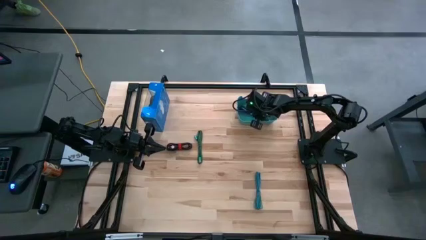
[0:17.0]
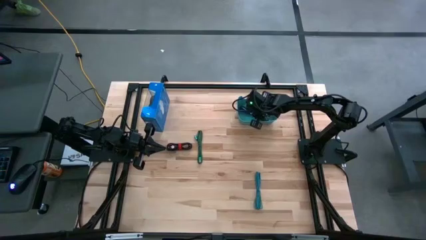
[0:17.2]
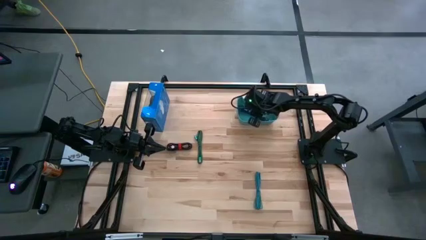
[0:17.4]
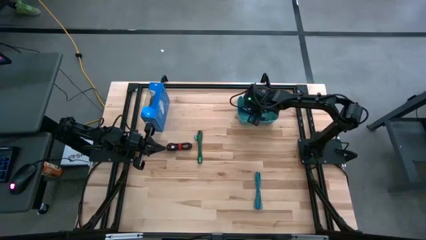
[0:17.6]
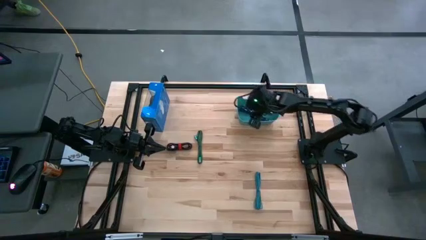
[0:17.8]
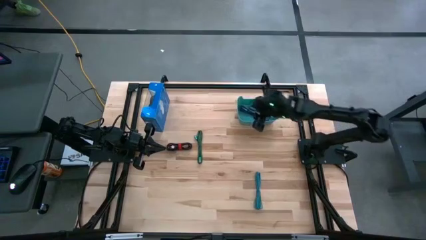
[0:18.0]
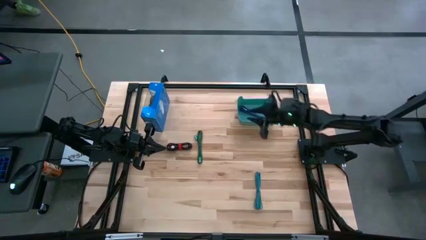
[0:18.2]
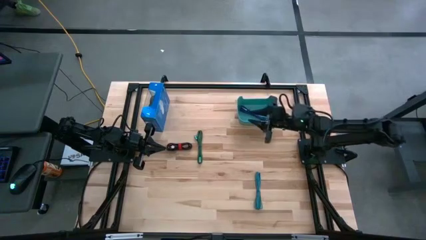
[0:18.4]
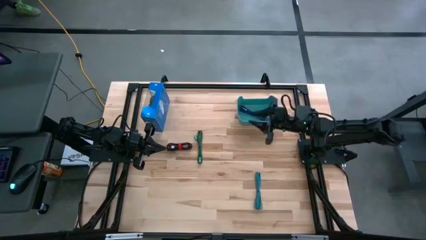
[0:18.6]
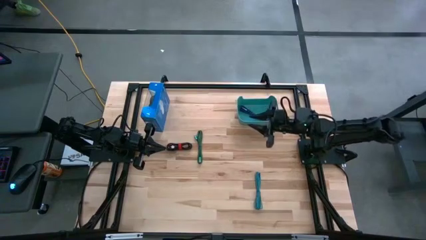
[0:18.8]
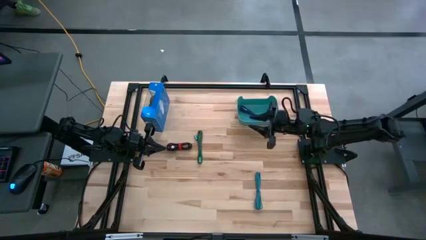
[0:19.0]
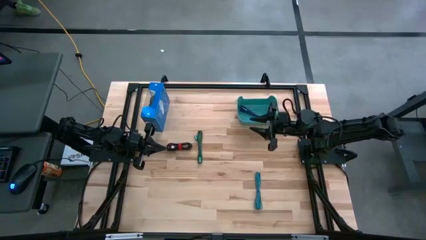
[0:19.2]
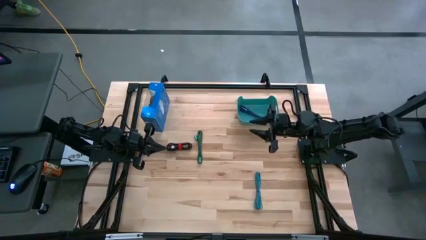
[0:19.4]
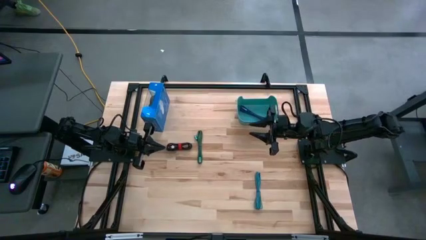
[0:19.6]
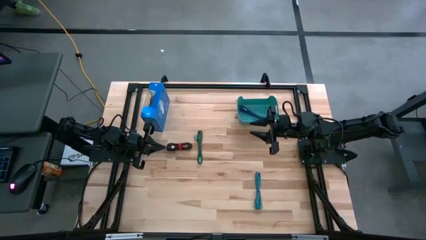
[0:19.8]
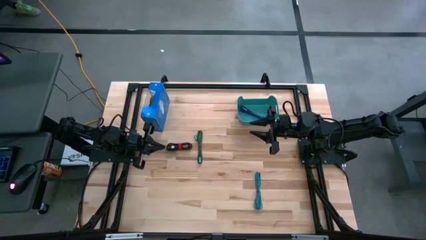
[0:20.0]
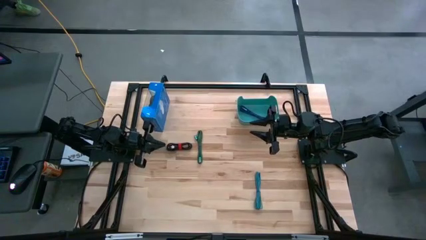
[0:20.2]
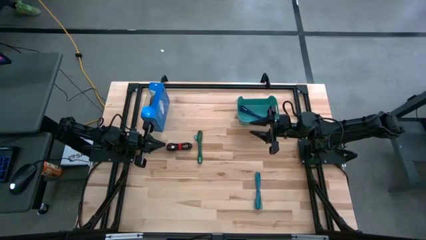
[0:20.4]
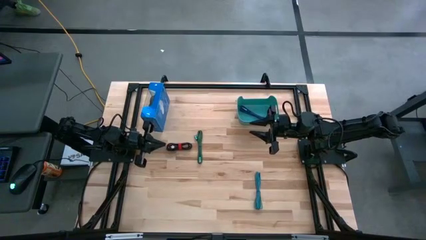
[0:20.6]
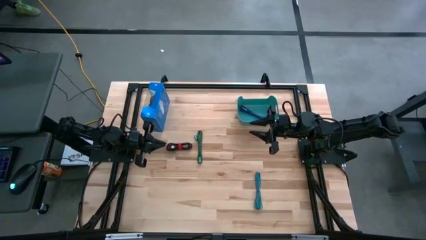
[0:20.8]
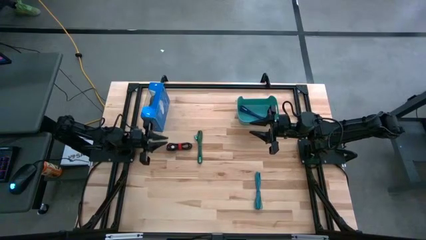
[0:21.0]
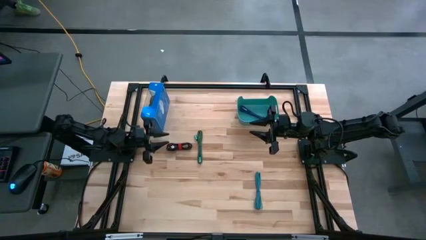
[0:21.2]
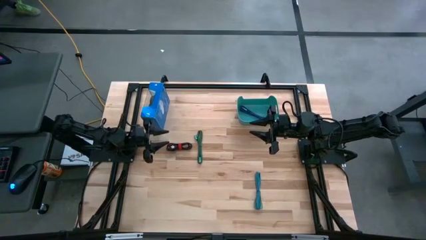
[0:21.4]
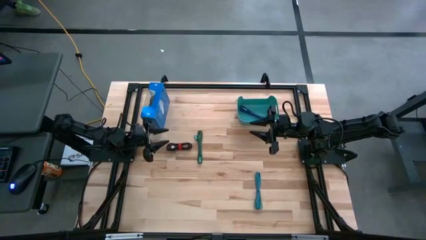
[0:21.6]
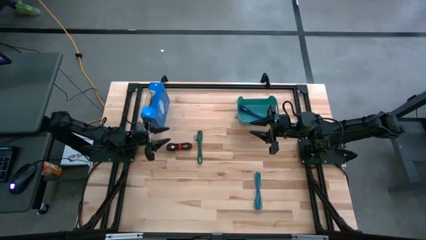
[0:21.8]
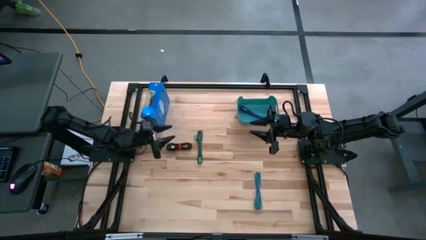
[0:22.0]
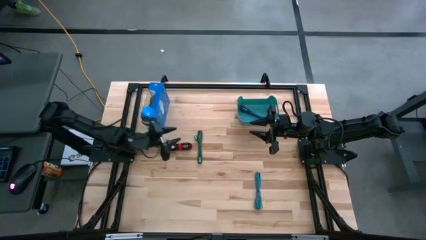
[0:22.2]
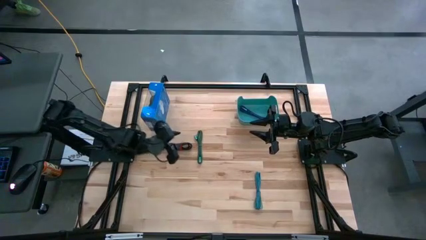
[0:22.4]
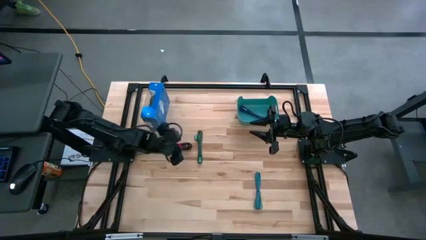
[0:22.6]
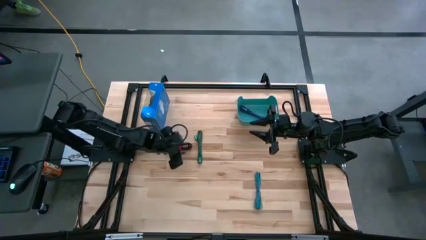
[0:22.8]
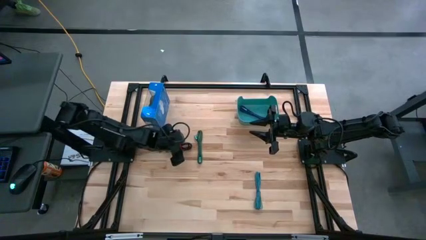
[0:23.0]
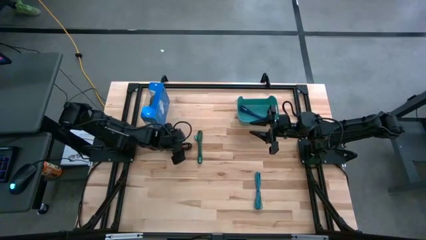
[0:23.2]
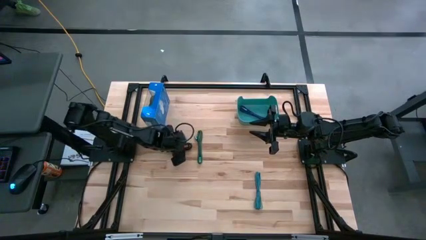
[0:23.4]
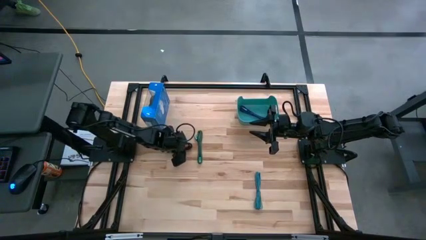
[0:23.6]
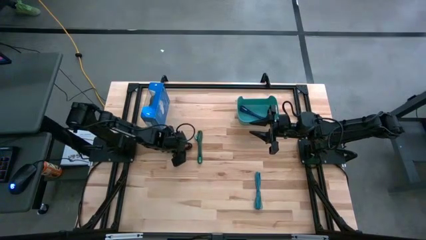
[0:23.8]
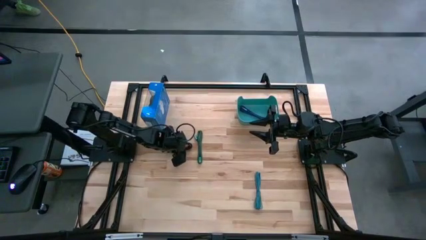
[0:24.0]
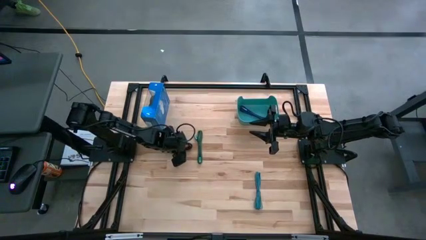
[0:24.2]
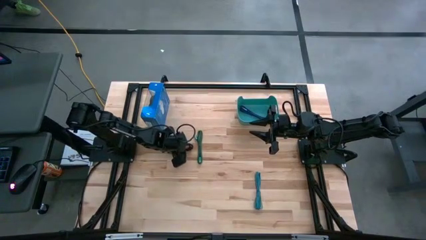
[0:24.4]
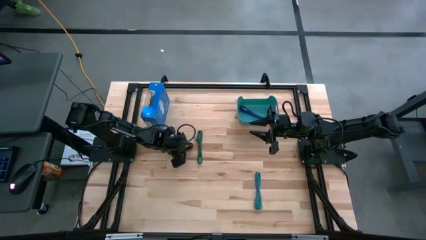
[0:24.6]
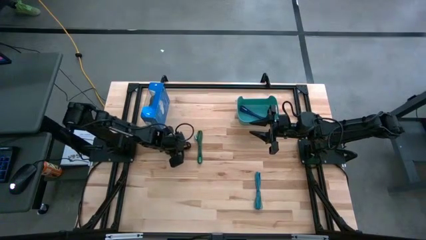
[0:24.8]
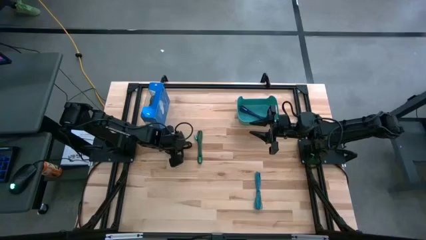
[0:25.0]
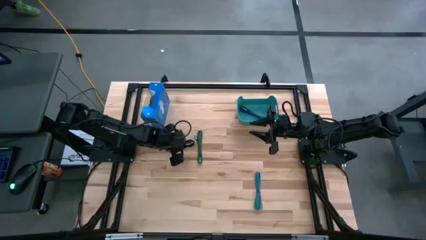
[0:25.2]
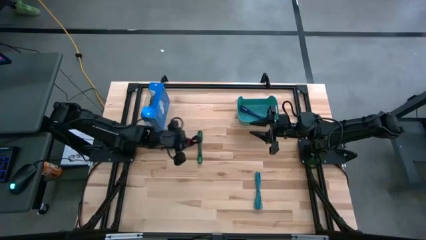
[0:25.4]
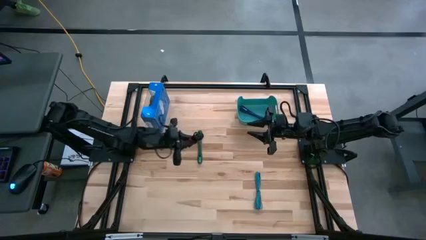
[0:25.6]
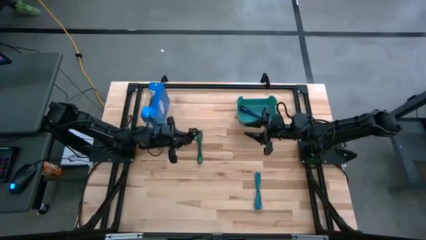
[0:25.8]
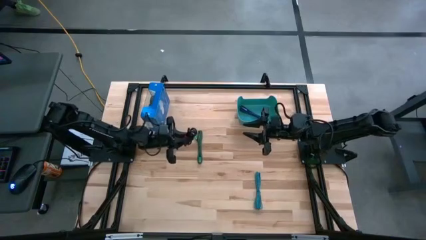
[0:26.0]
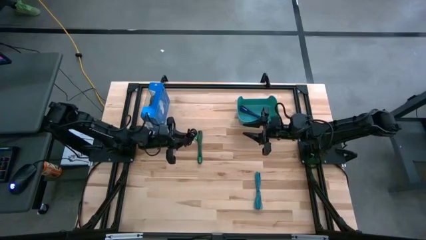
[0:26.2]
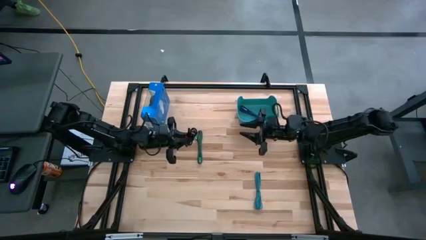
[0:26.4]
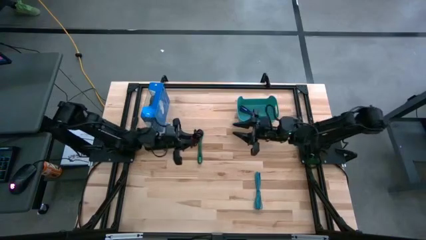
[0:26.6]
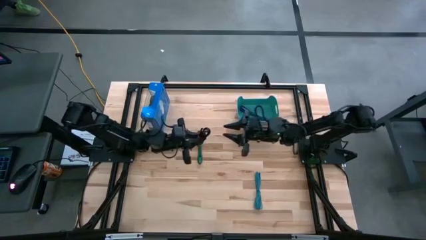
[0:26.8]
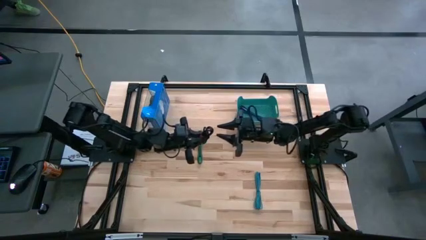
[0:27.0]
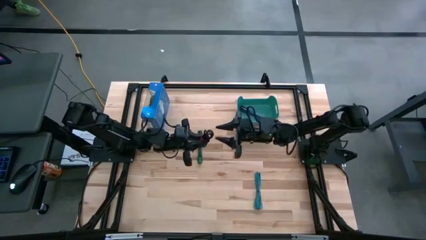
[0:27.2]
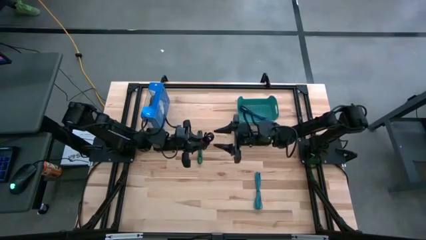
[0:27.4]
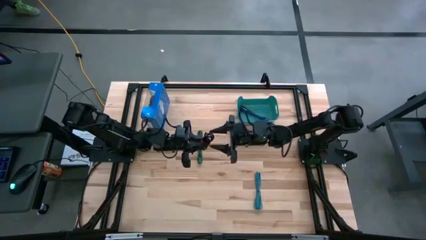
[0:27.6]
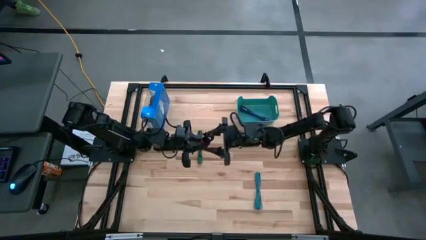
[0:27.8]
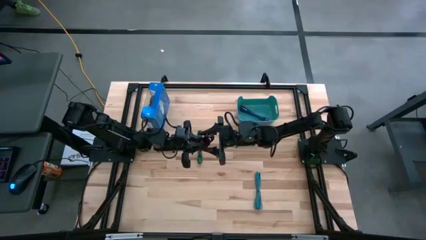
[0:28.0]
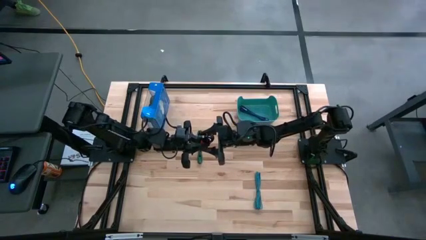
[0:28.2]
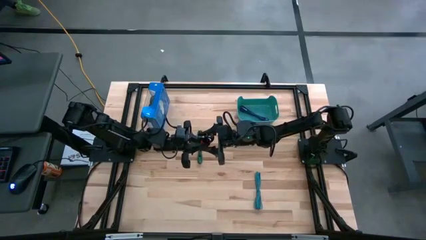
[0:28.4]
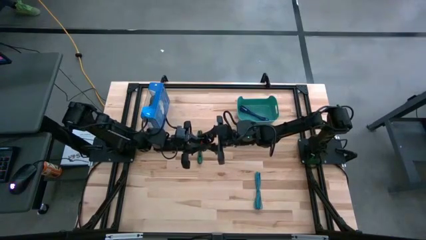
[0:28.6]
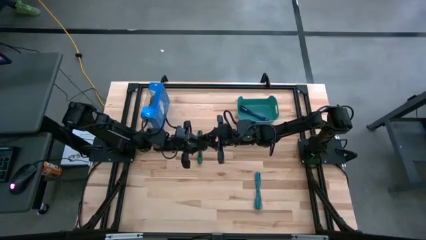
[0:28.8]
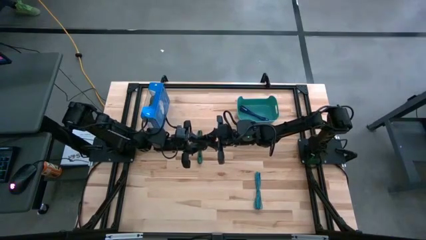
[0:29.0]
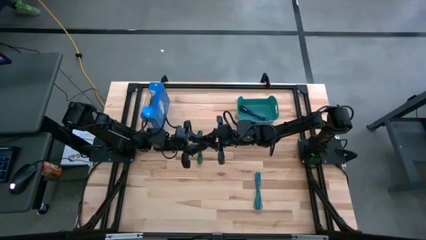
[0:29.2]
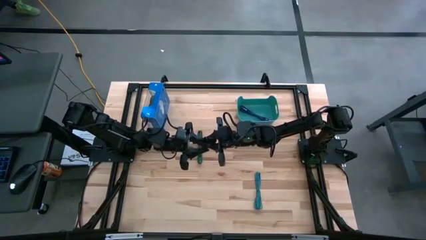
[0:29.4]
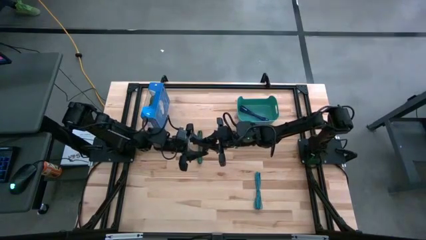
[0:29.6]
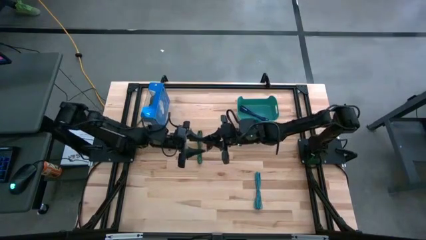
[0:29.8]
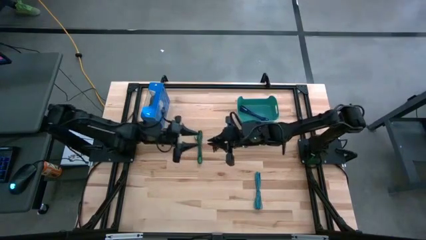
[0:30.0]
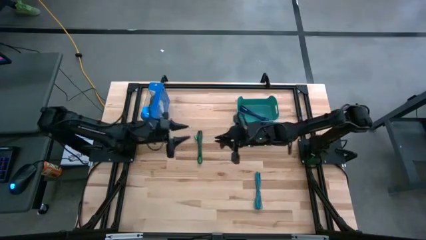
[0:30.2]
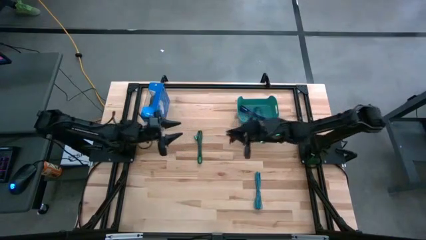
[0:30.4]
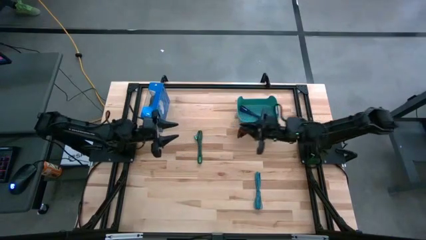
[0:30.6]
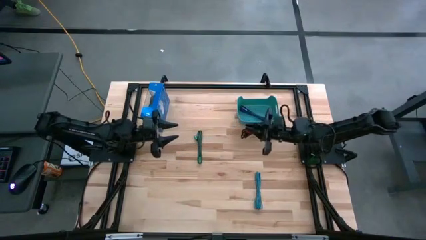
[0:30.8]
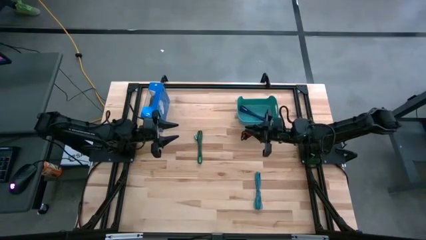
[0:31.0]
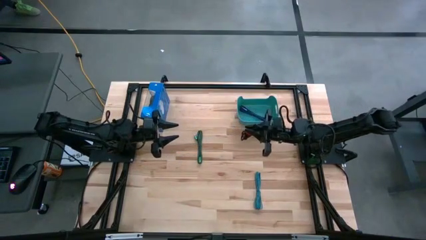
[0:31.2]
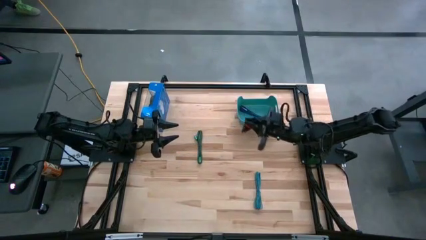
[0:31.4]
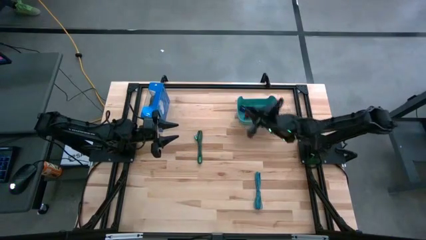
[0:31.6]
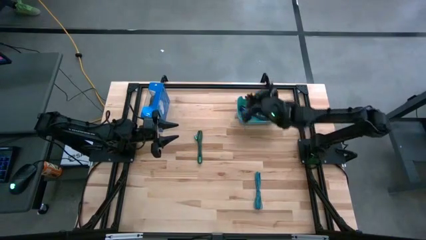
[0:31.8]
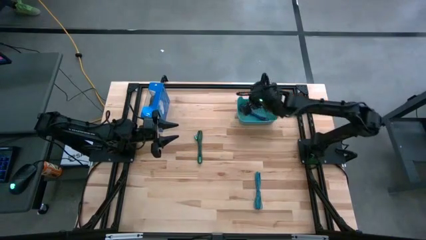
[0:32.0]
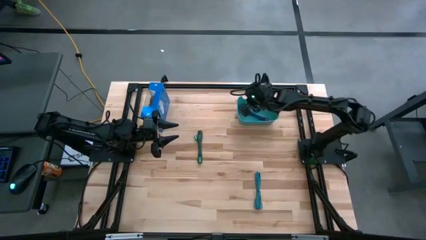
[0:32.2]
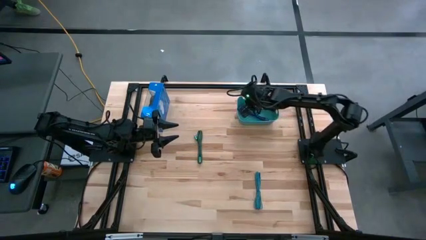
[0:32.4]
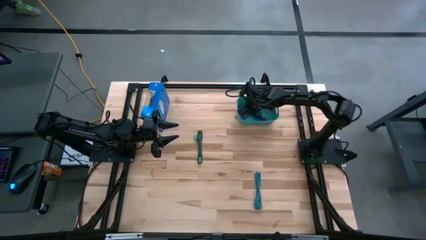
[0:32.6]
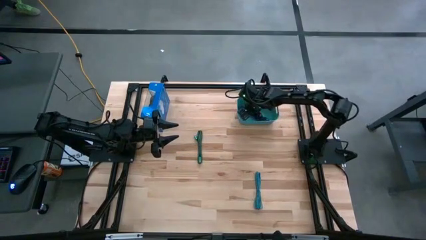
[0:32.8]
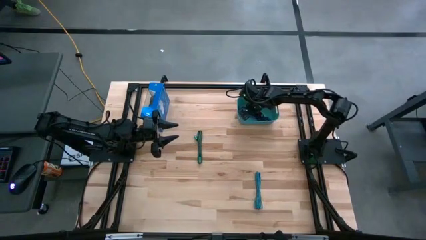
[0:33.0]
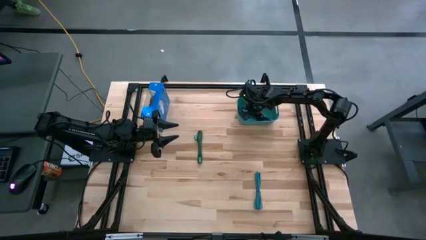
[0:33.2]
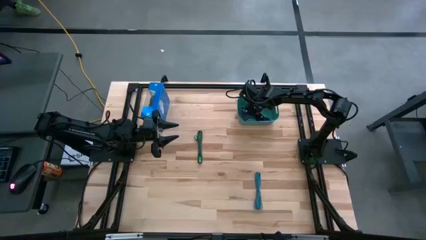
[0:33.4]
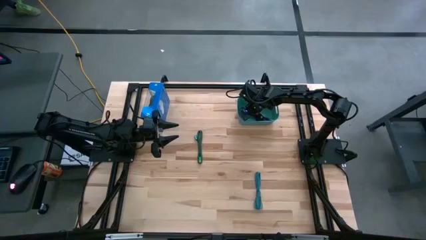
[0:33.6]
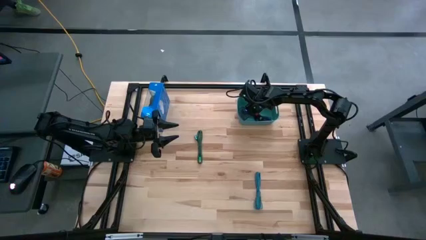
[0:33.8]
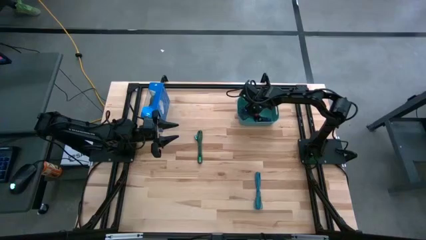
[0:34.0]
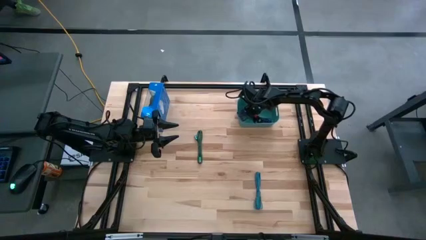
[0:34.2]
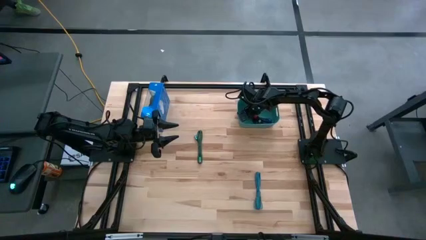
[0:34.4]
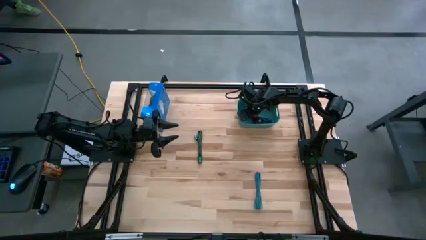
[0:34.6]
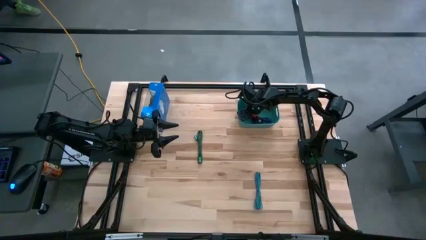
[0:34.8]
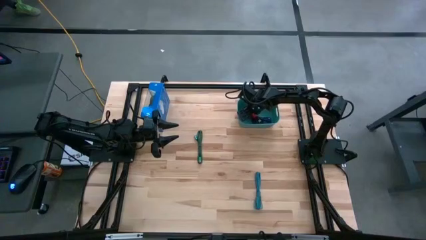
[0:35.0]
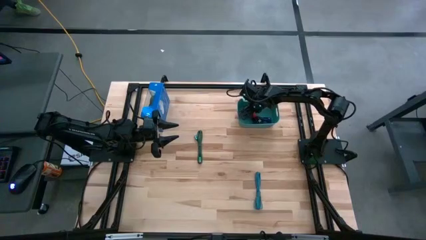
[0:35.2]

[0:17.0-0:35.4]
Task: Pick and place USB-C Cables
Put the black charger cable into the green bin
